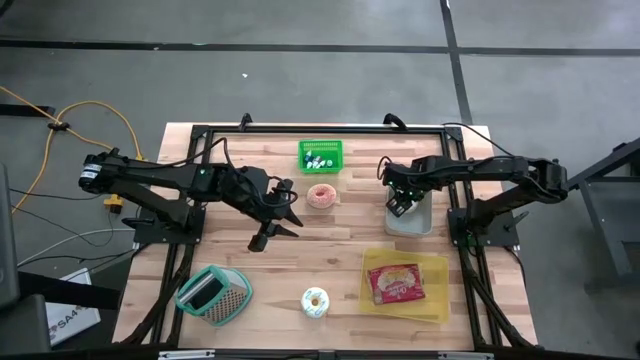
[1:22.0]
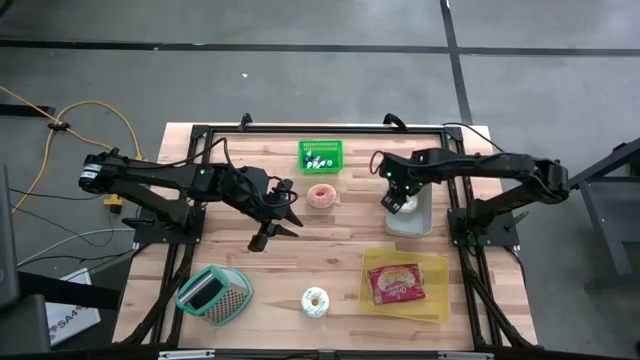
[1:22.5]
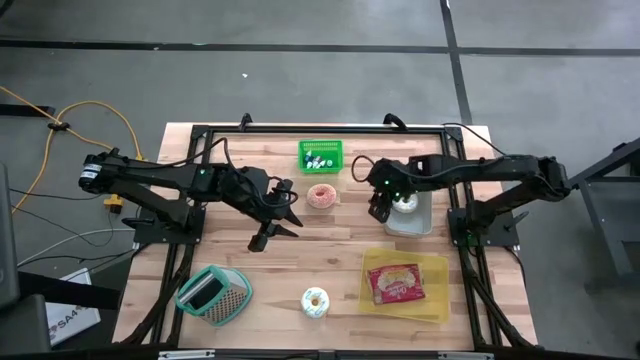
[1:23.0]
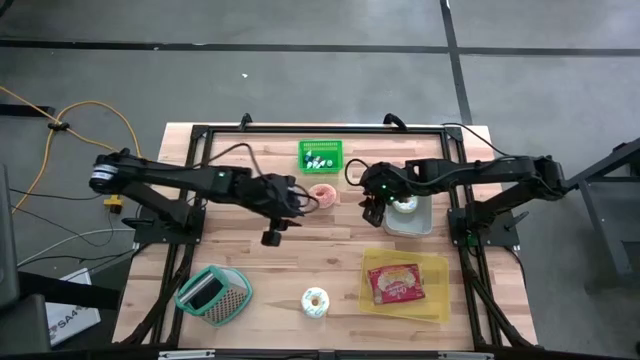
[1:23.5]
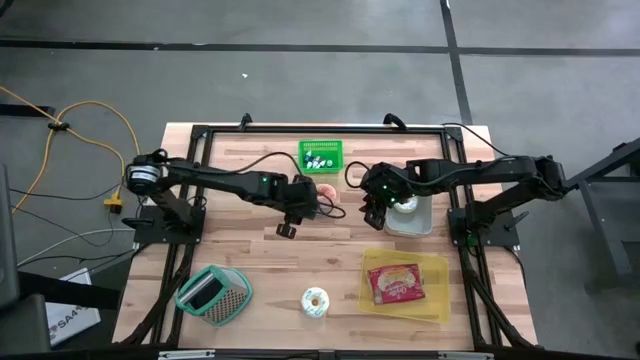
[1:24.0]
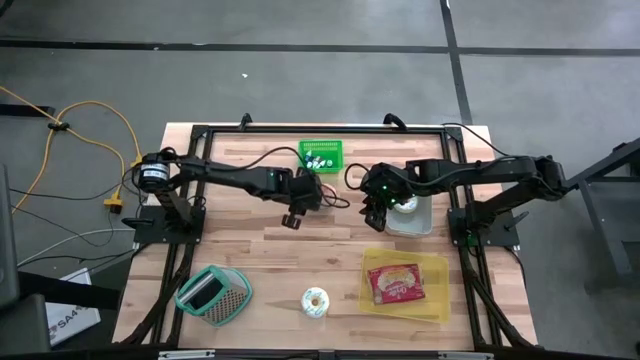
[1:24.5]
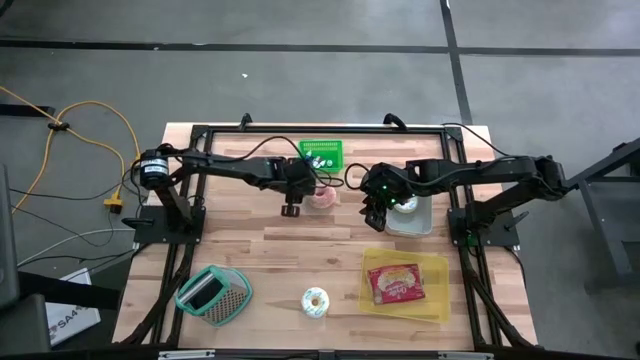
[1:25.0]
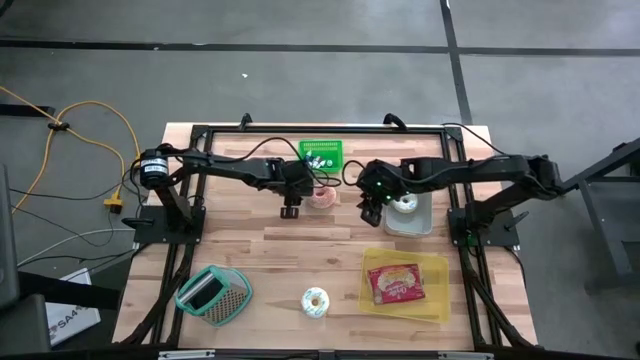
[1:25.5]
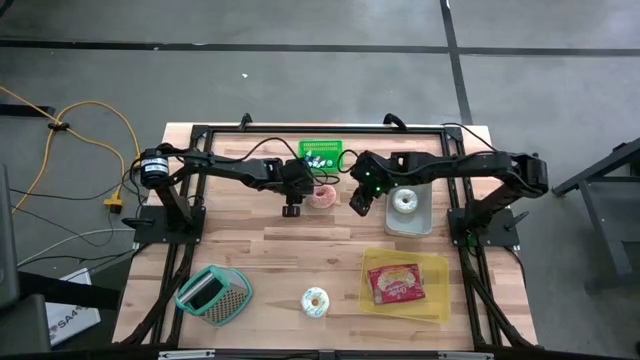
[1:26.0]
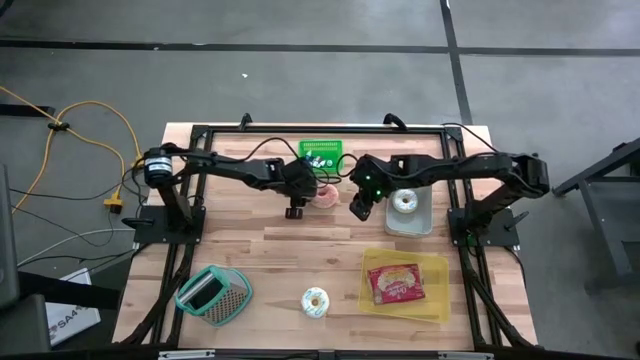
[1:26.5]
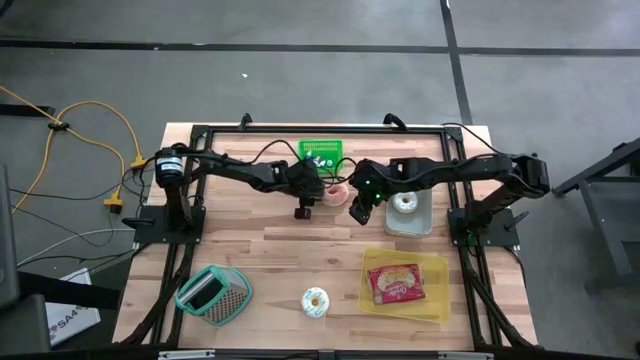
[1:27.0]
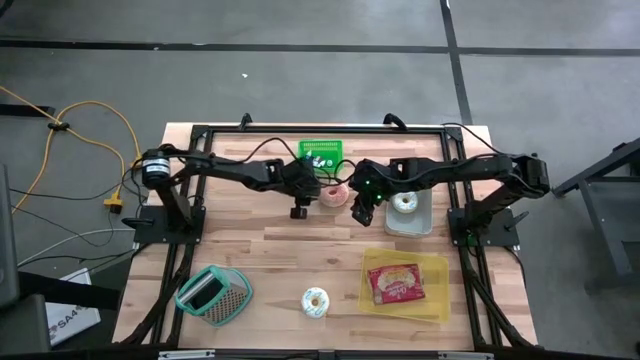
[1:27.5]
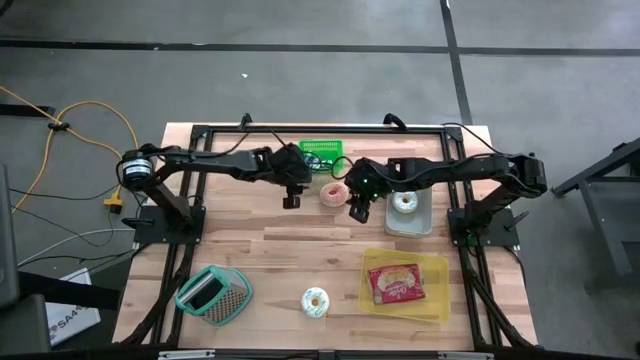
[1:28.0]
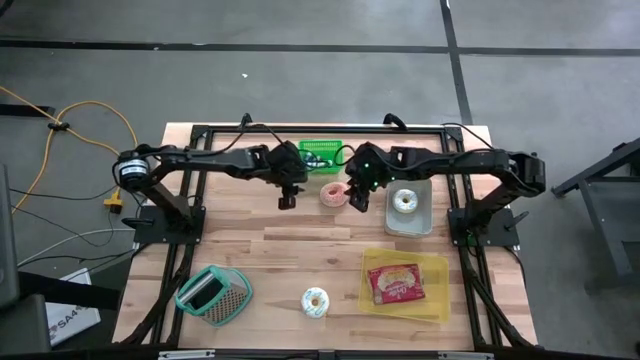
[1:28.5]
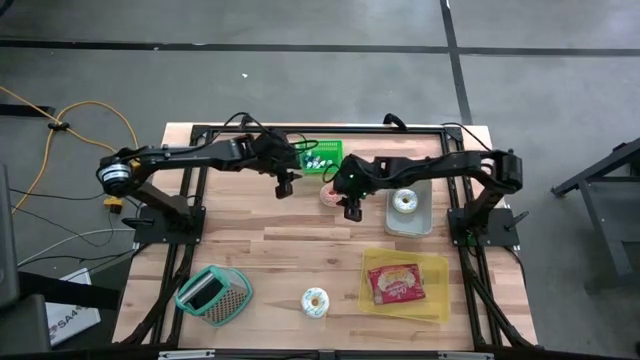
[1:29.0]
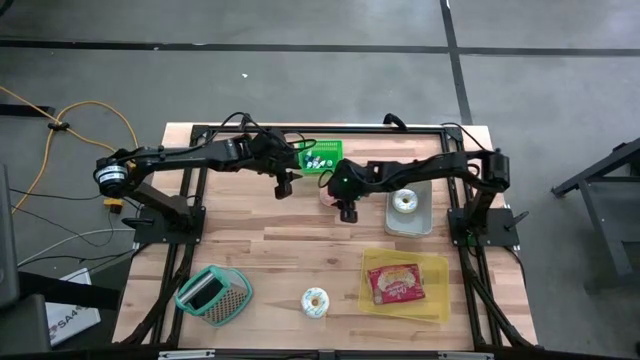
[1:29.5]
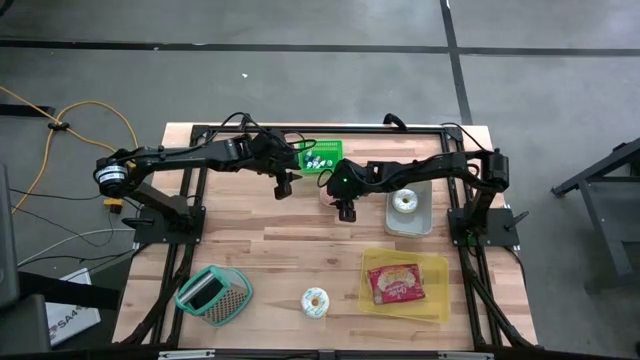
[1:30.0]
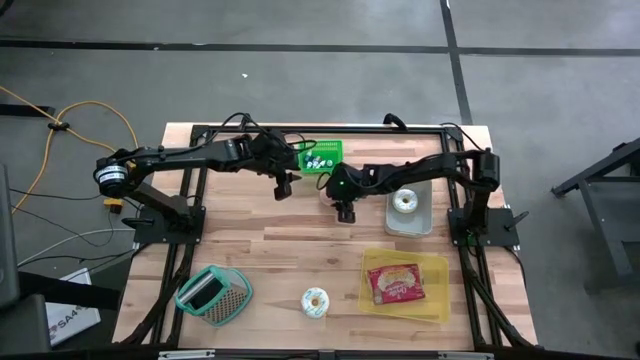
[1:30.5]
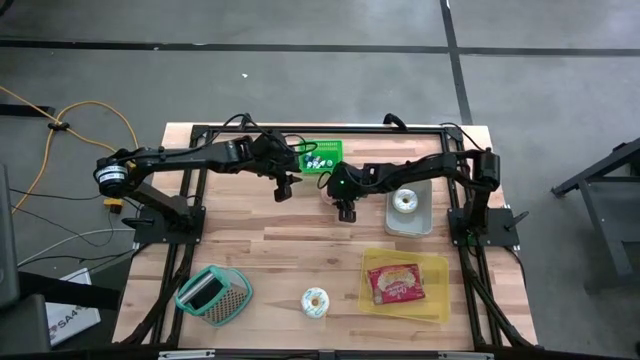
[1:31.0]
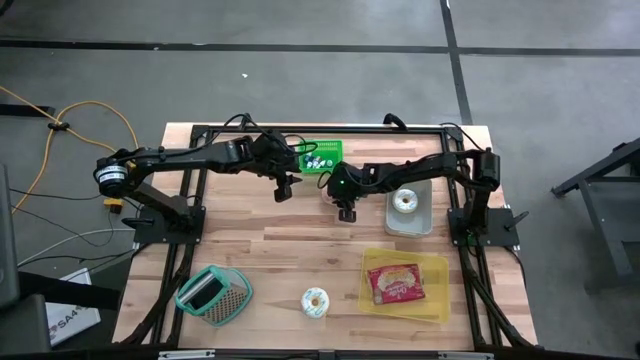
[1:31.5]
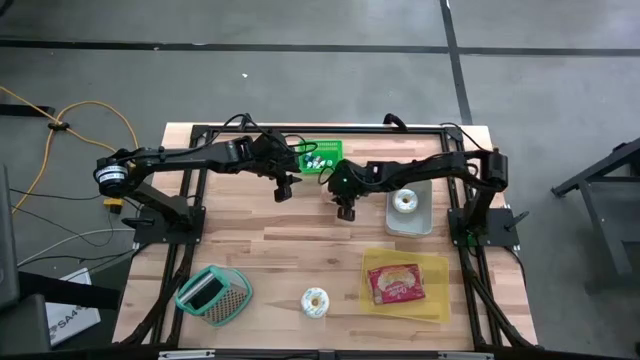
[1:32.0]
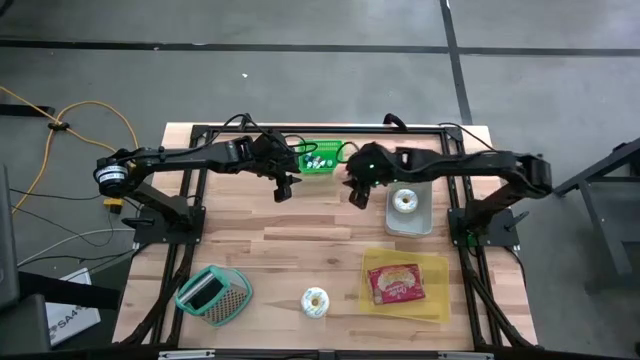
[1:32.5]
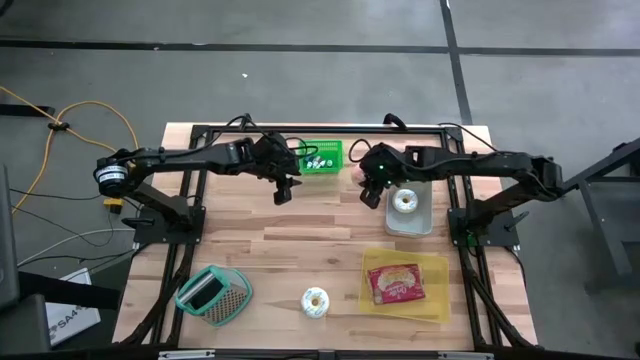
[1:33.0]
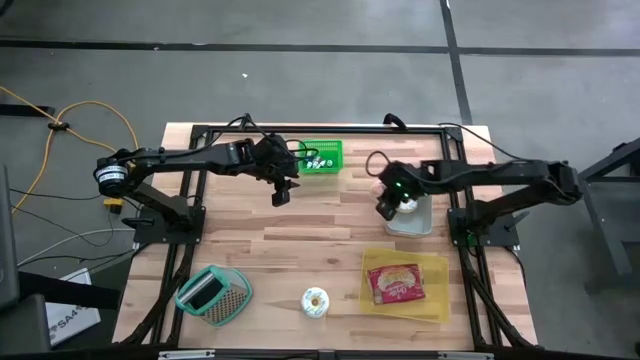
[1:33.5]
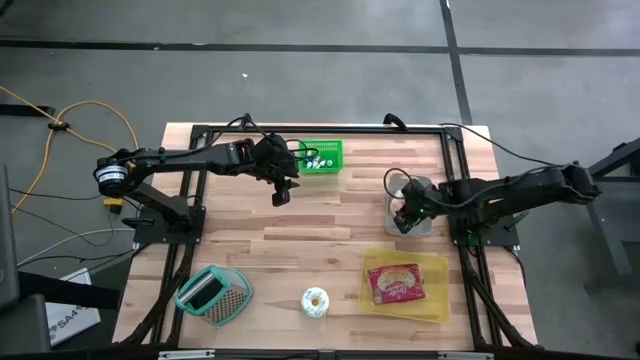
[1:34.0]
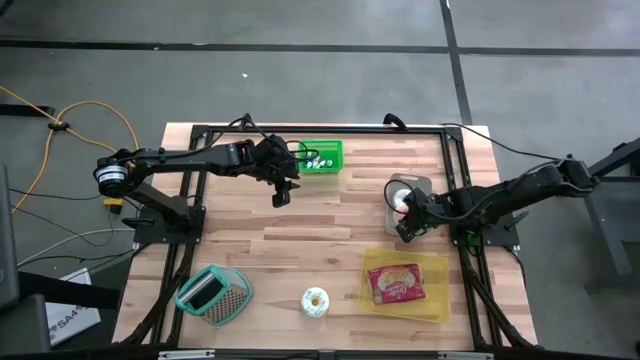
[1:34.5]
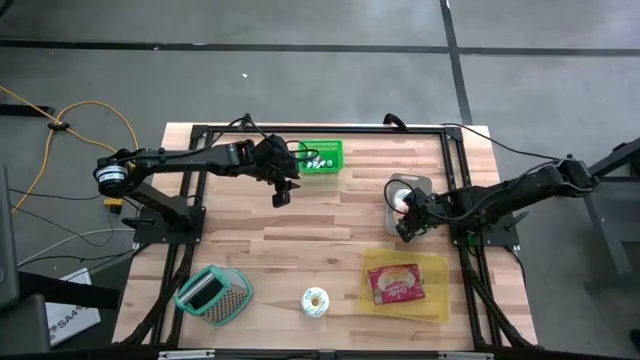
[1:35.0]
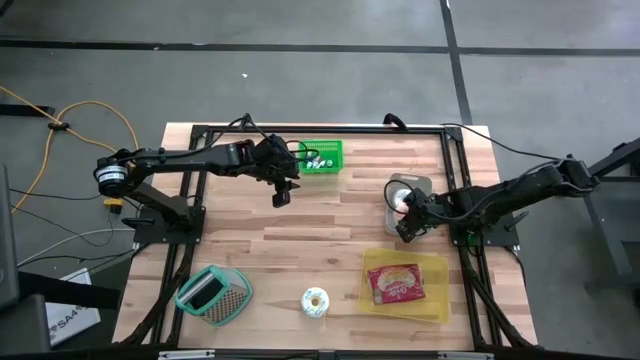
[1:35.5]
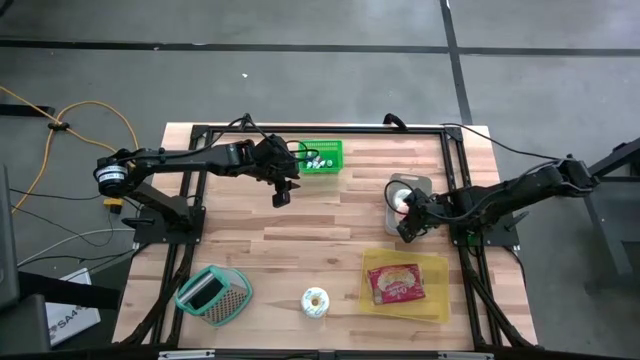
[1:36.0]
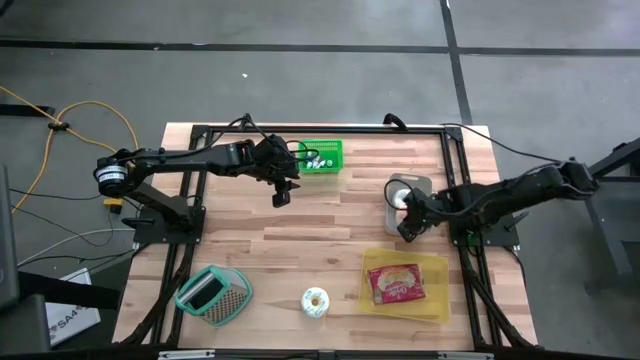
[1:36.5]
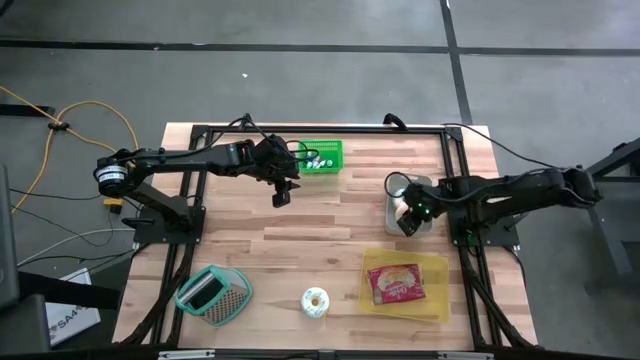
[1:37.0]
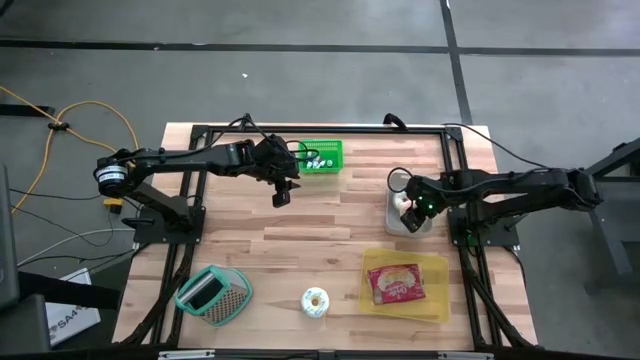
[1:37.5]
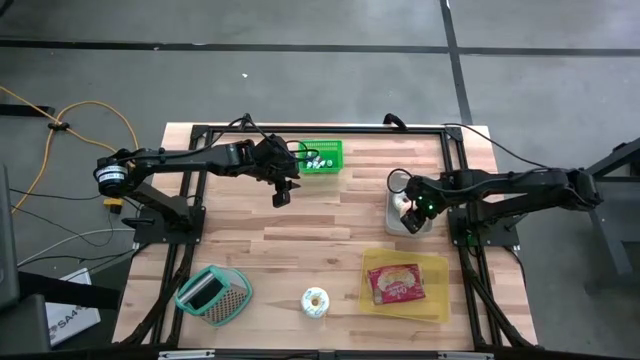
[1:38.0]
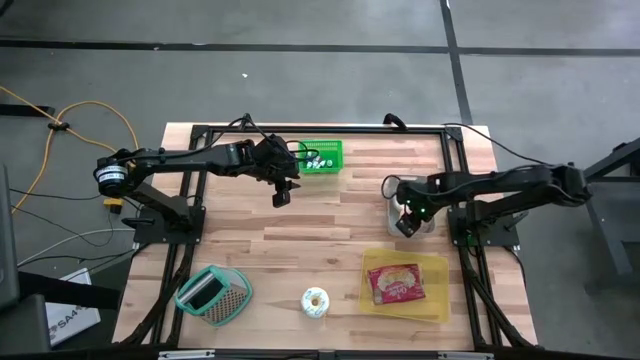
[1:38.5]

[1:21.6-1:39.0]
Put the brown donut into the gray bin

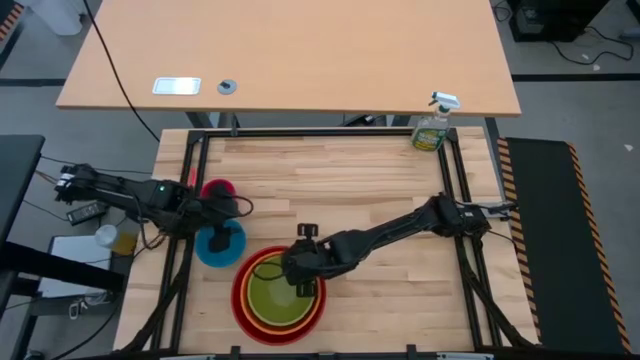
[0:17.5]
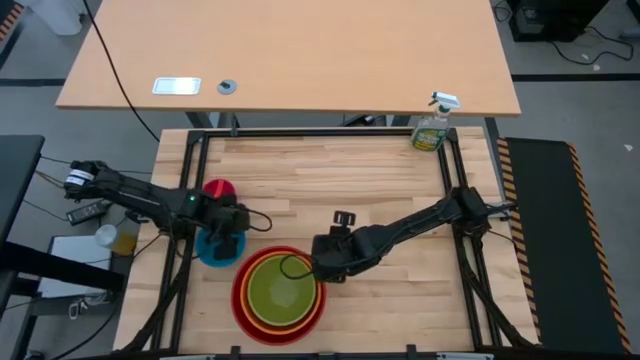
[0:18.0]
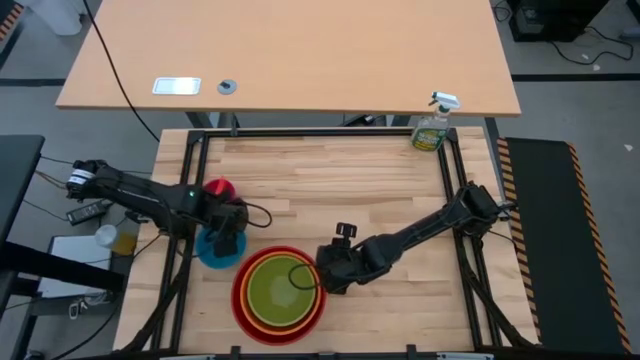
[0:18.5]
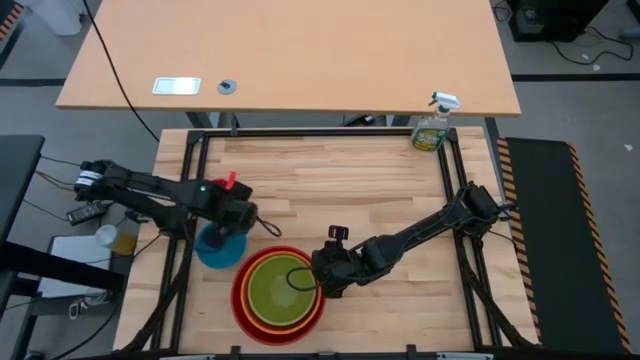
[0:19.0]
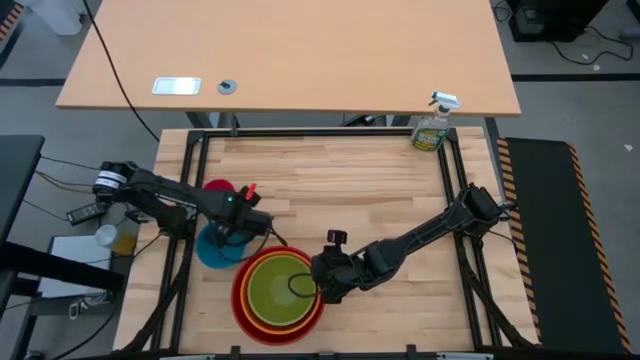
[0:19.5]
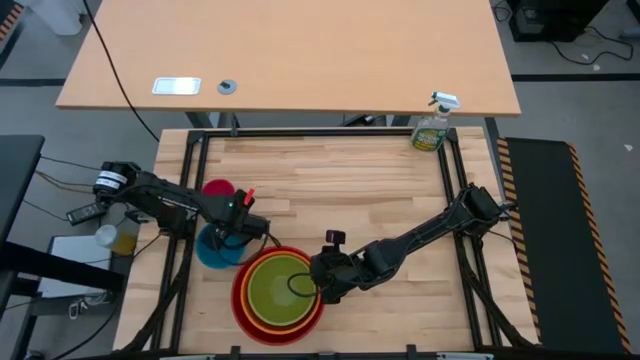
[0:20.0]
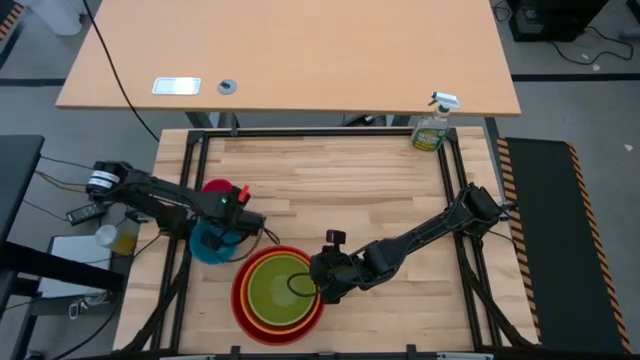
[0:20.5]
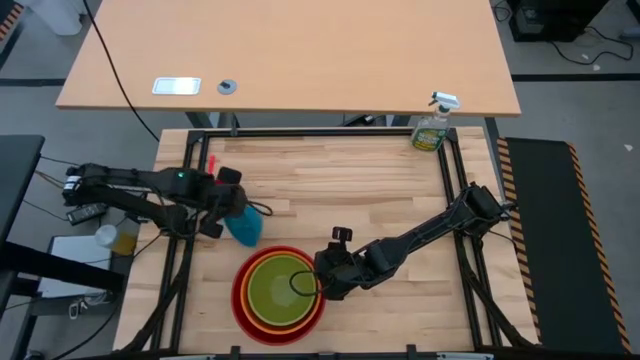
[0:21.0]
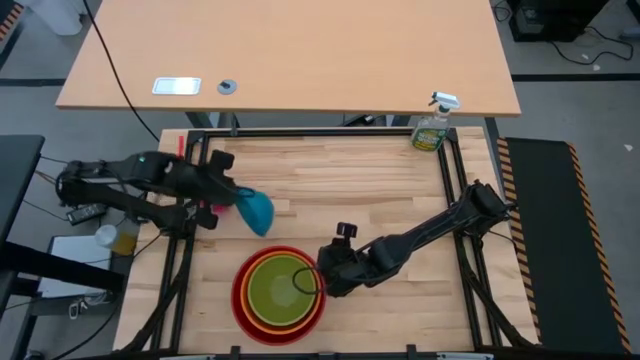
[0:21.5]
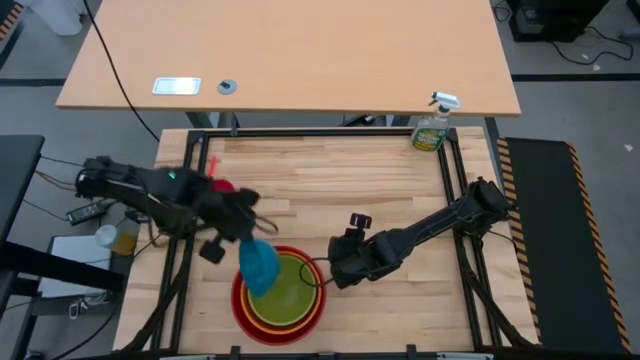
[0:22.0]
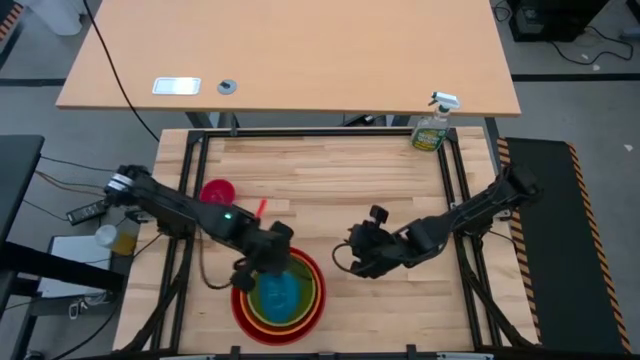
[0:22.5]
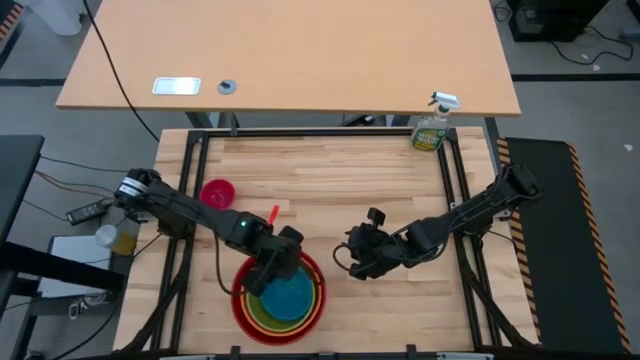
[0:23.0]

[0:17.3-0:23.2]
Stack the blue bowl on top of the green bowl
